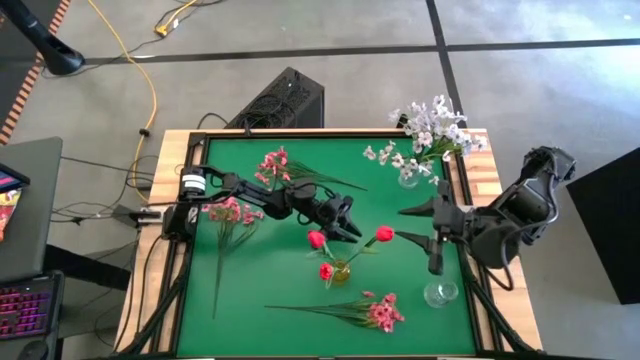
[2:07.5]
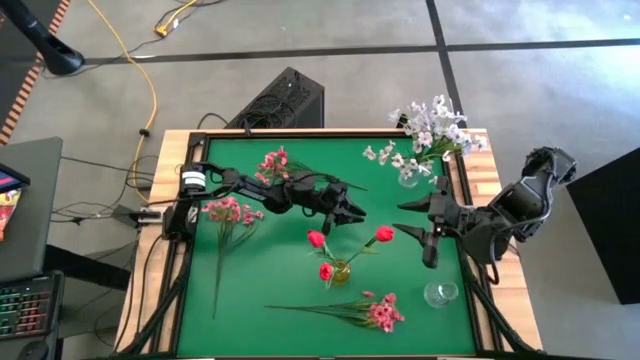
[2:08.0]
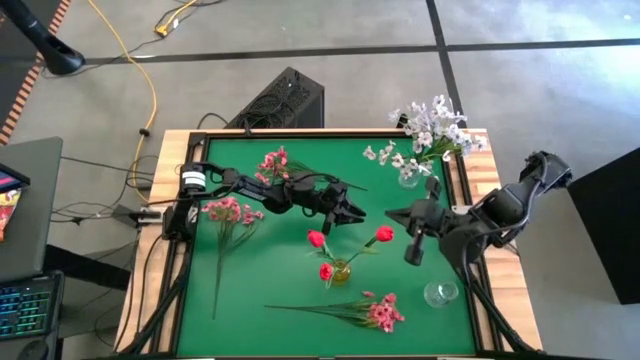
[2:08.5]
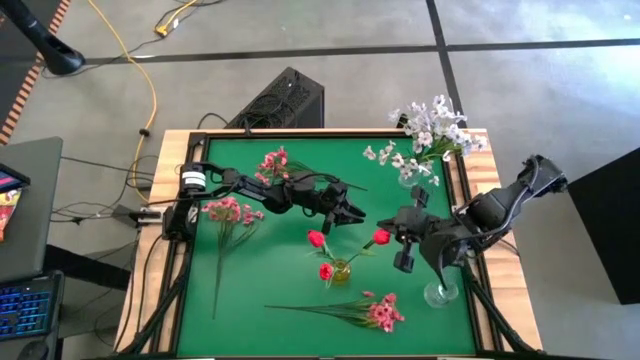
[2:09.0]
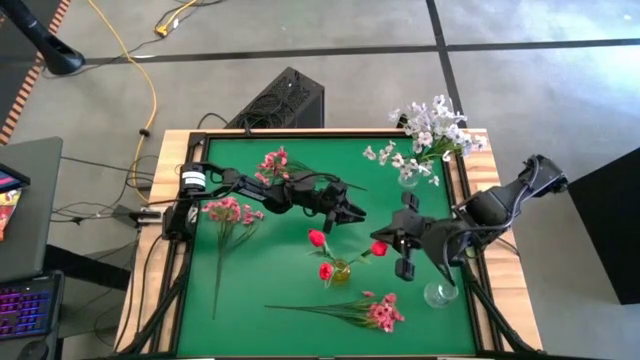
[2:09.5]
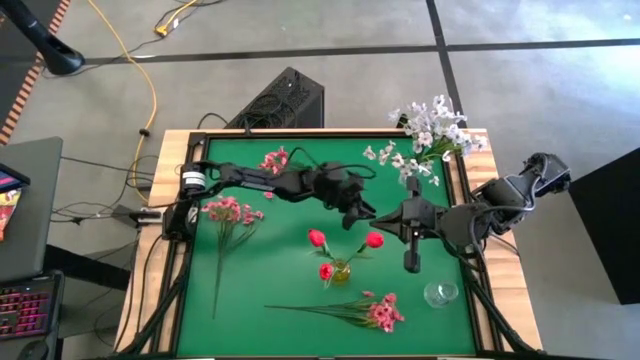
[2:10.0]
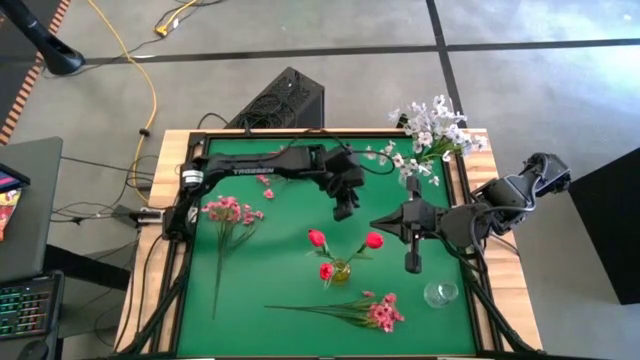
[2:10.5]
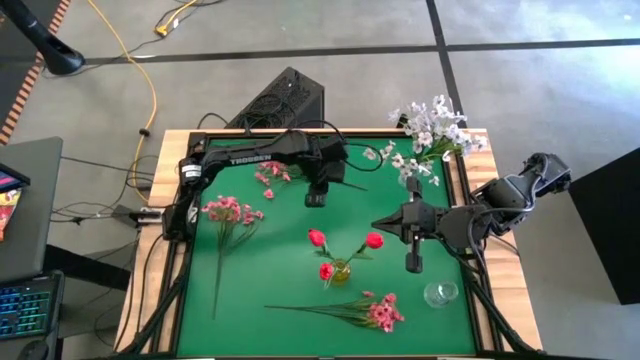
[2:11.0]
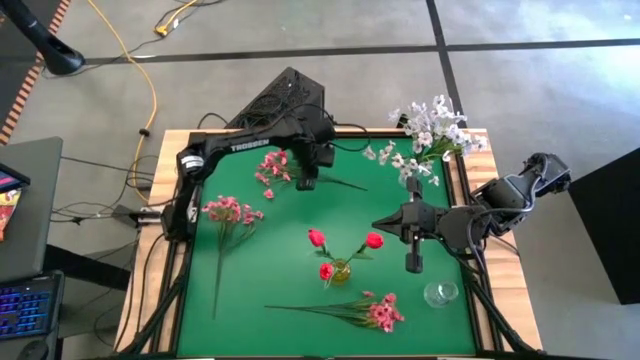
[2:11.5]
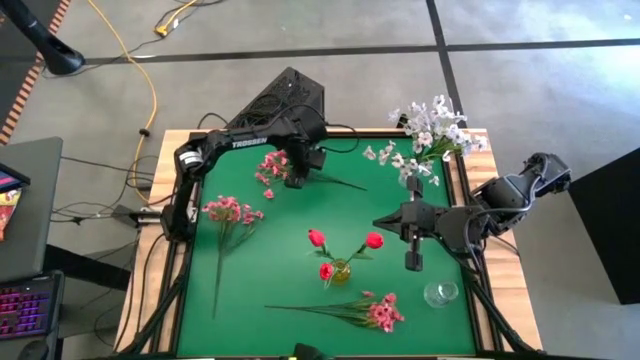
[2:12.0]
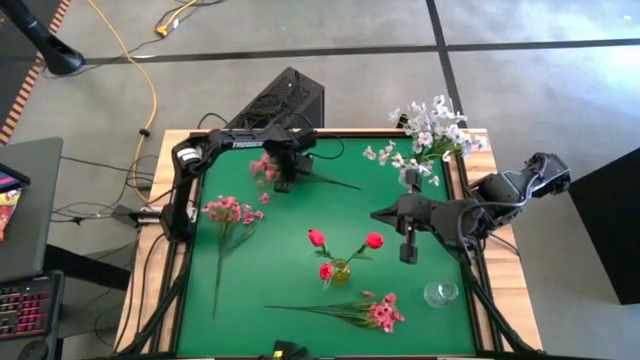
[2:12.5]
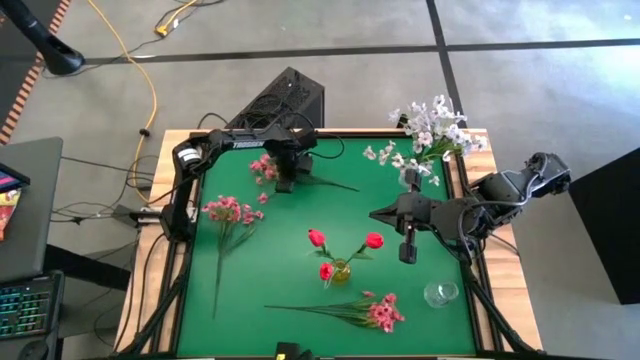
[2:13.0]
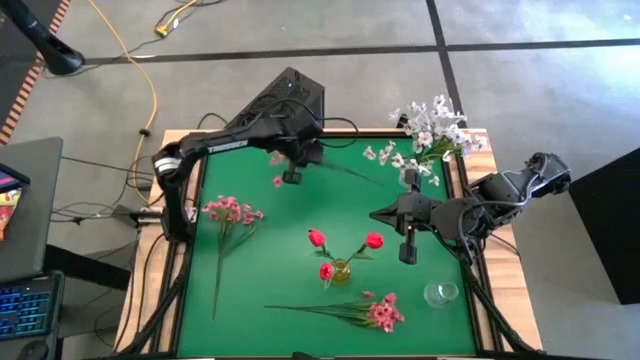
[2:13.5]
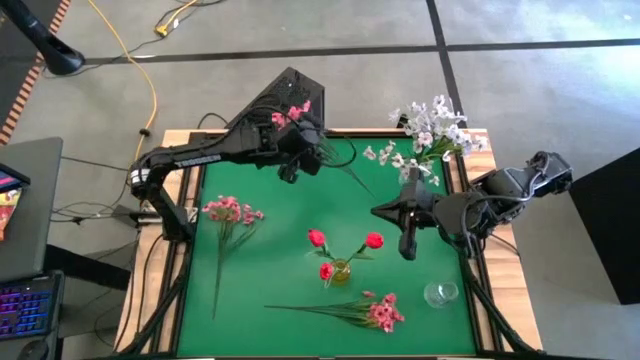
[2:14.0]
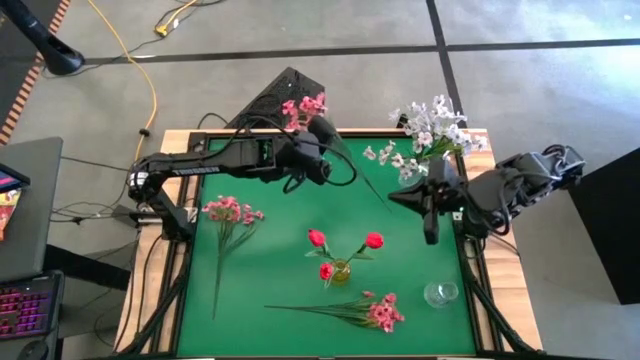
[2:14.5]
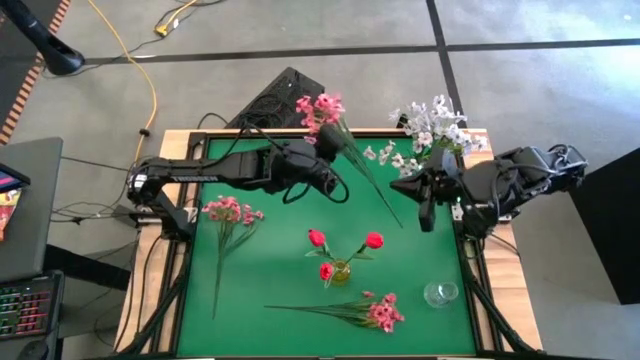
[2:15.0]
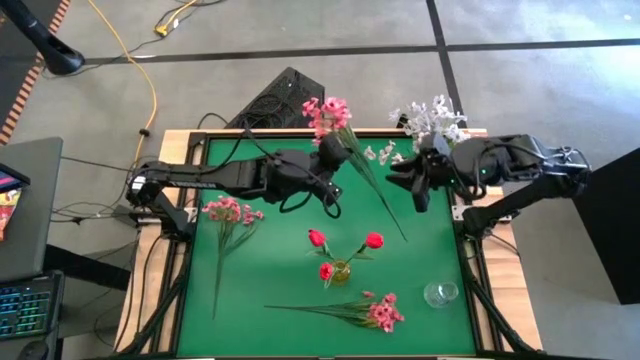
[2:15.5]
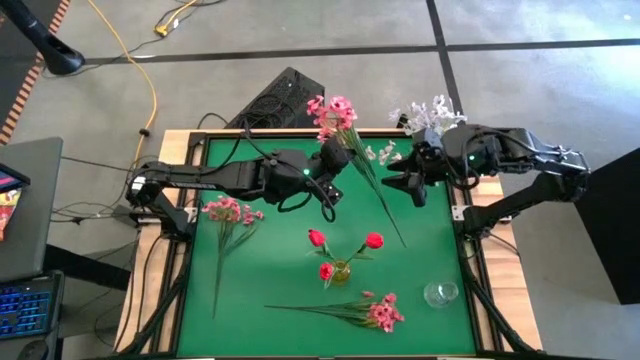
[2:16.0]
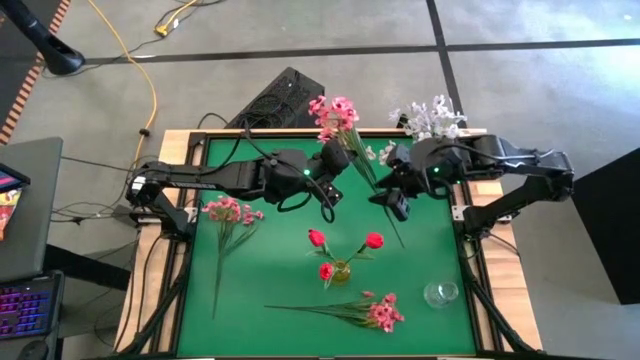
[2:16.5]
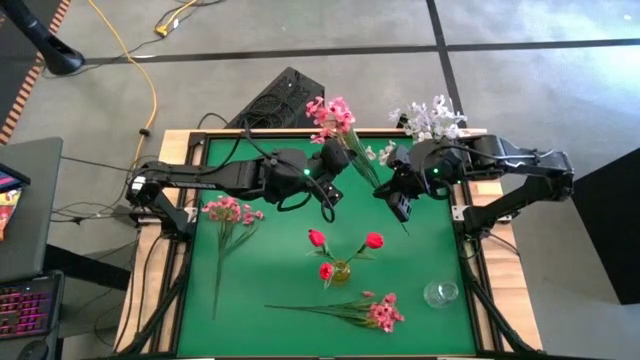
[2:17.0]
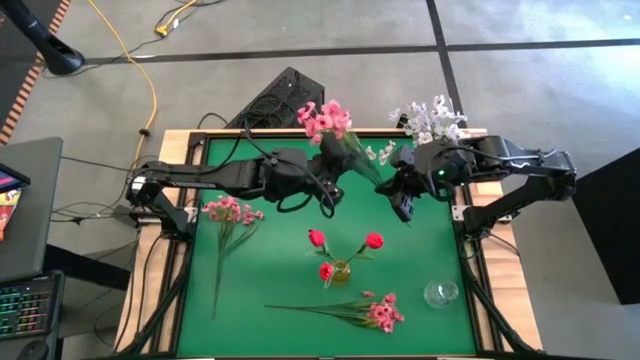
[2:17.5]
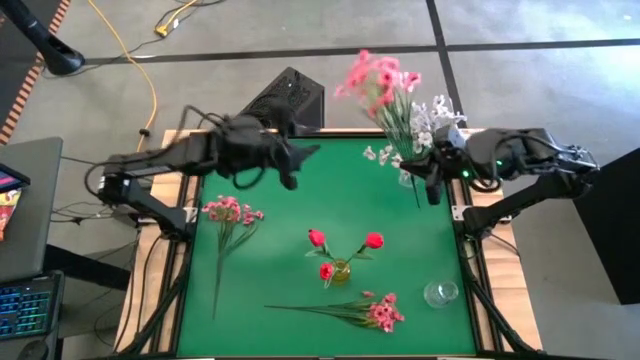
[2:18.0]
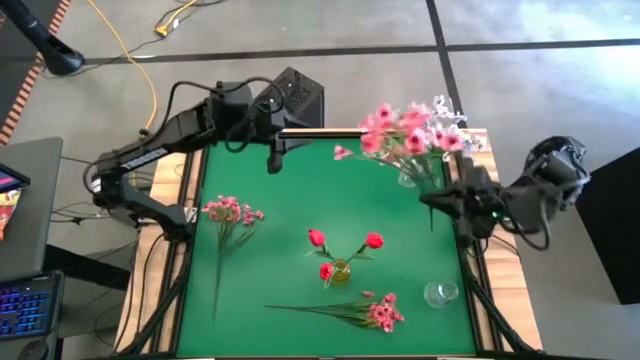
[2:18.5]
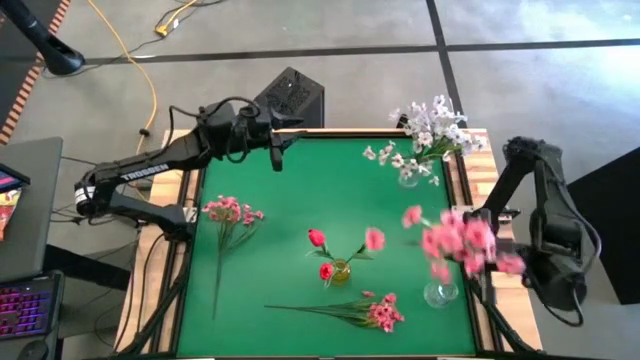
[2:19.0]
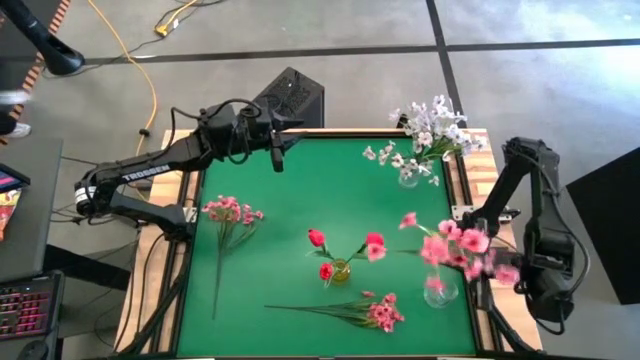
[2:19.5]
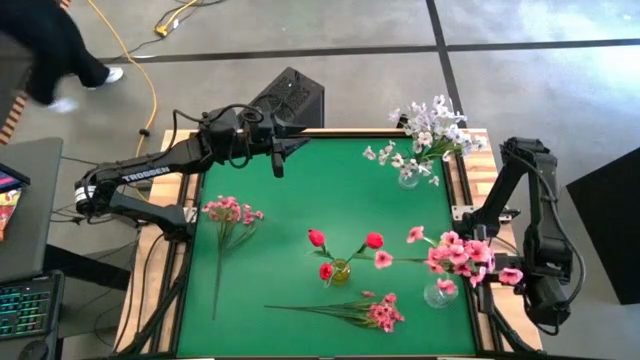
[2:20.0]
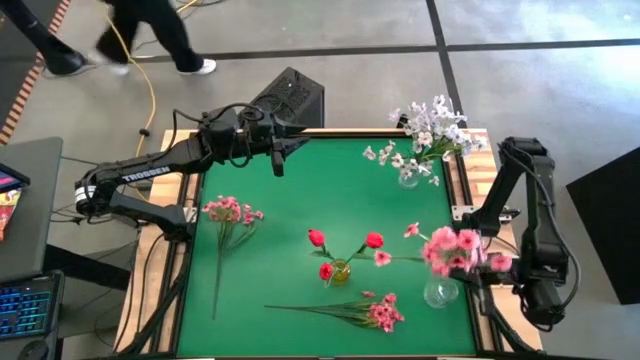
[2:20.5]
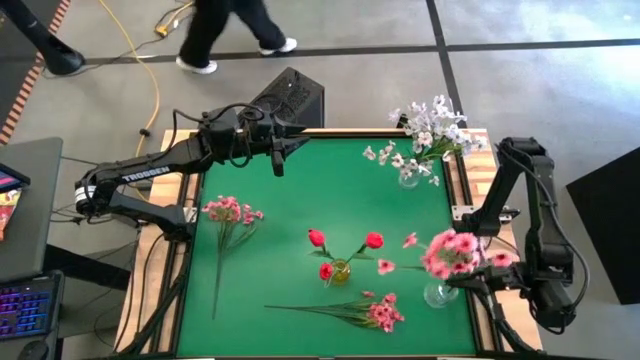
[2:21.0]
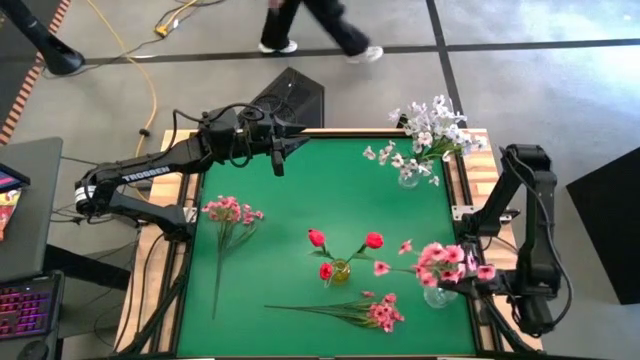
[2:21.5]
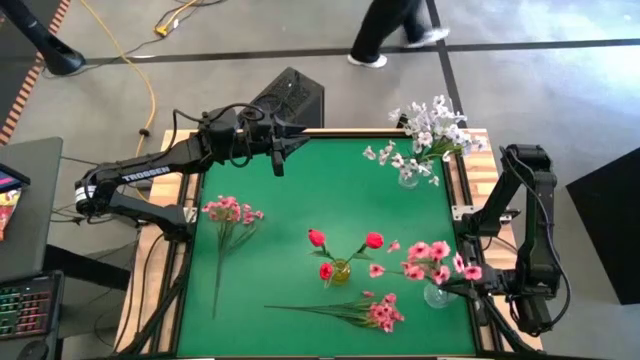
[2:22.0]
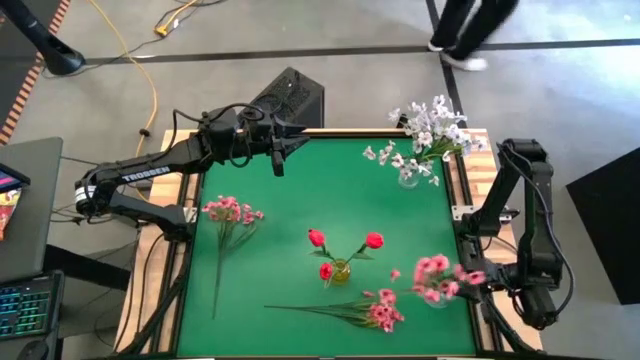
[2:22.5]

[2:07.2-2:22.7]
Task: Sort flowers into vase by color
Put the top middle pink flowers into the bottom transparent vase

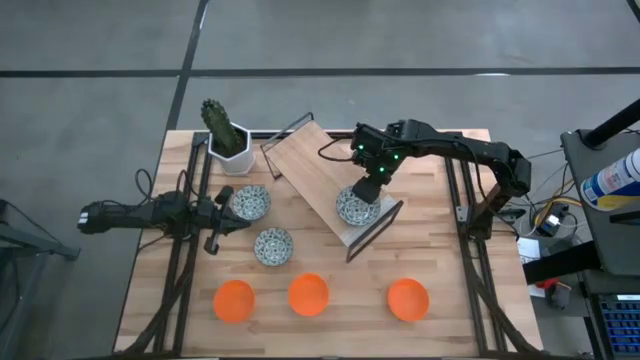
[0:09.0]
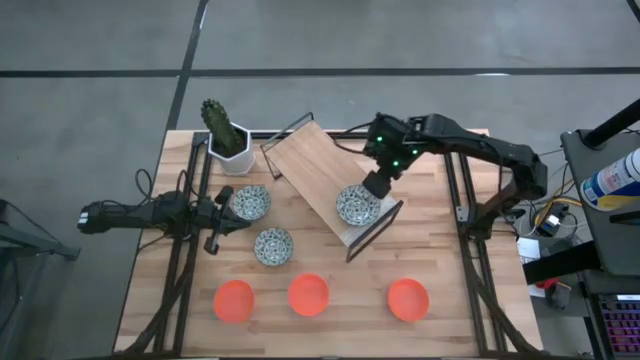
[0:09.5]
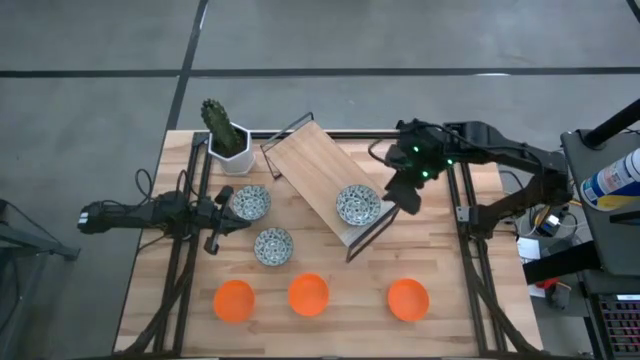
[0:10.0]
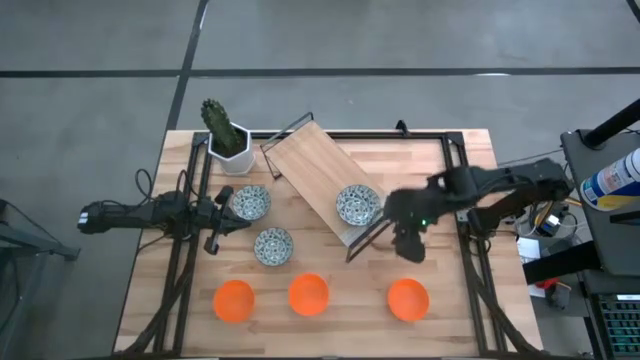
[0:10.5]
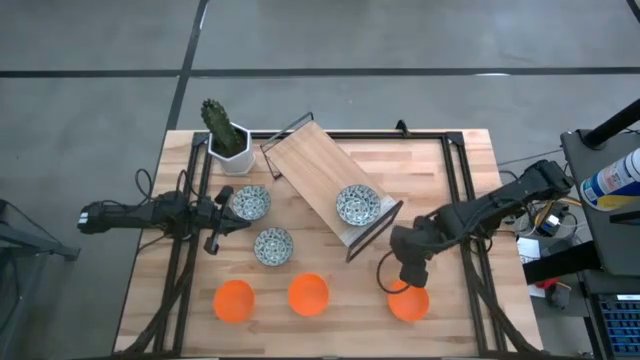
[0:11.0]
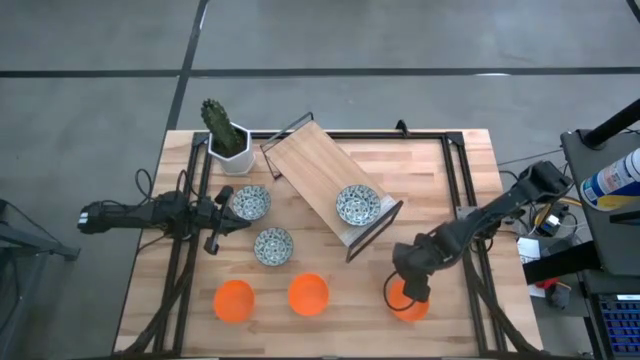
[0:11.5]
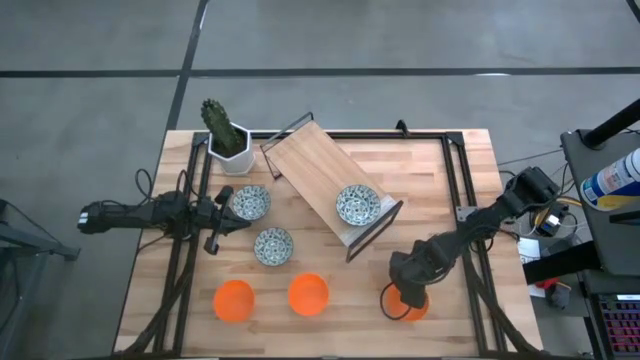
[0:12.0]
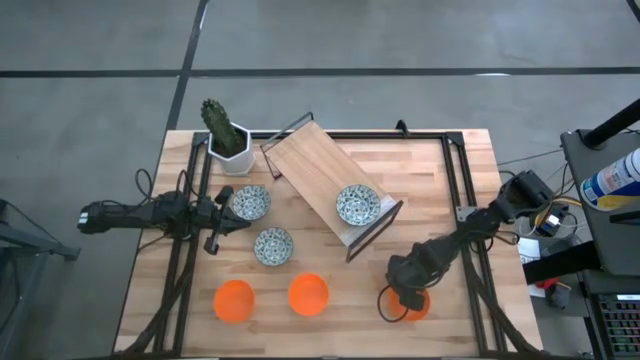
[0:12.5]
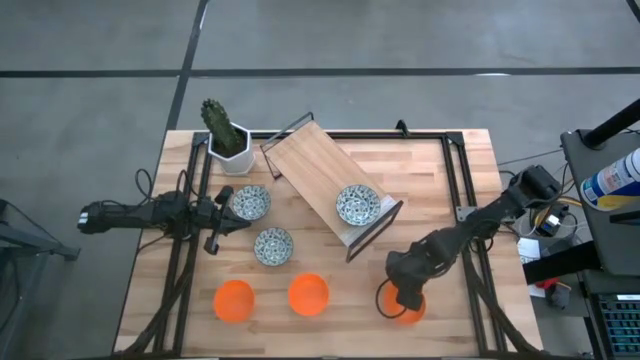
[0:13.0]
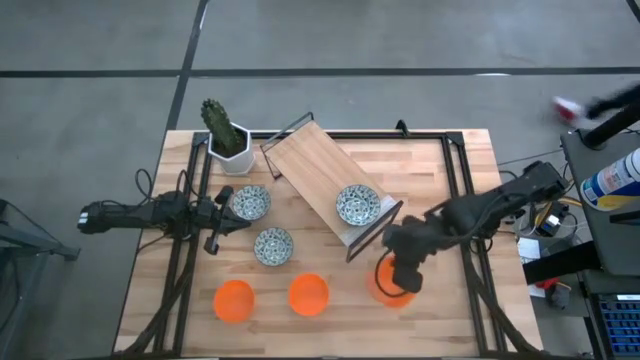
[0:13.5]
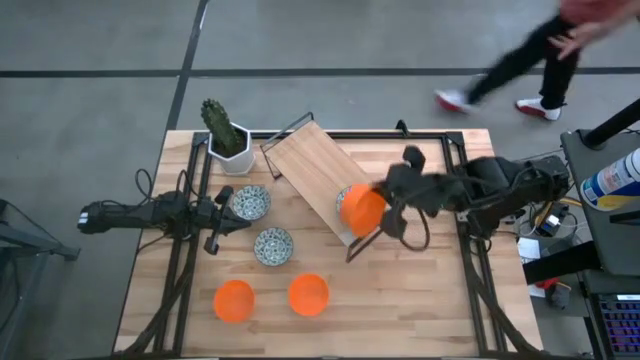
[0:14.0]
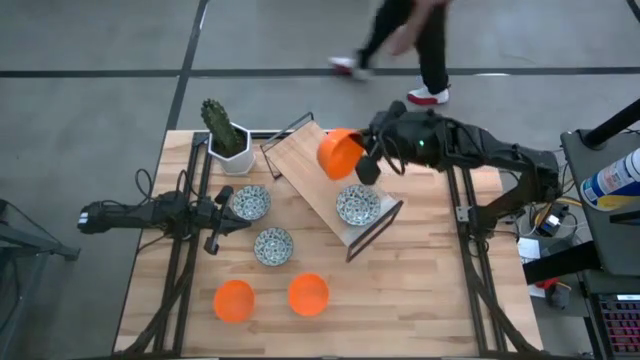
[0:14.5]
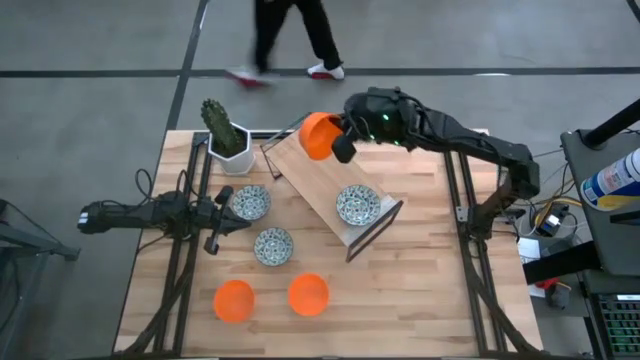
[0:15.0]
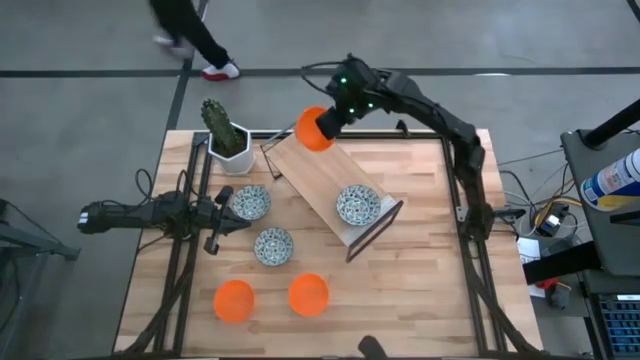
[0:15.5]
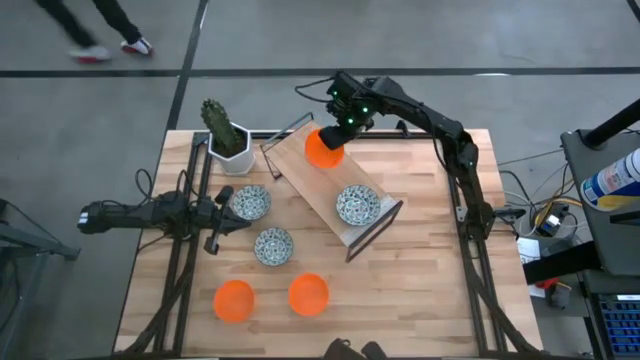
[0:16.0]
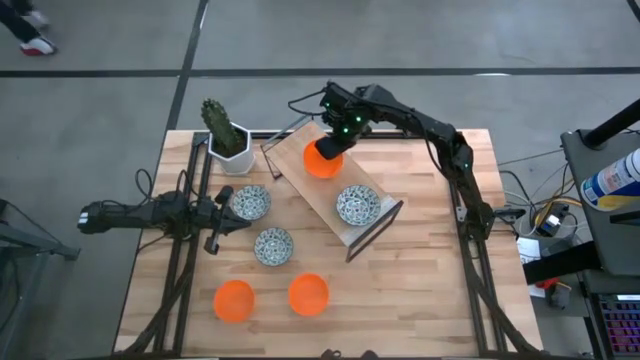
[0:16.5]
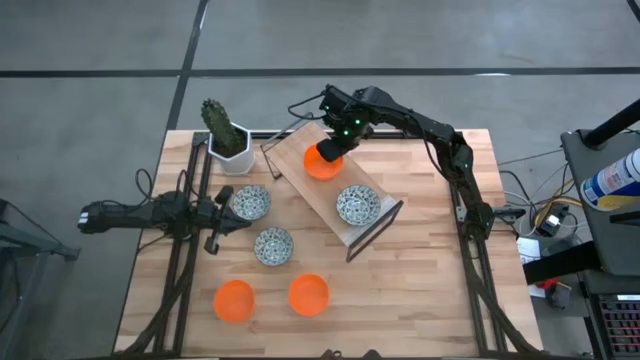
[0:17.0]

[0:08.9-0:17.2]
Task: Pick & Place Mini bowls
Put the right orange bowl on the shelf
